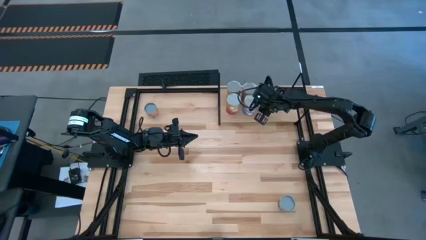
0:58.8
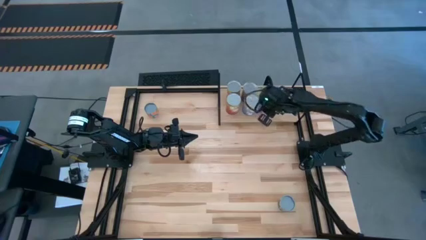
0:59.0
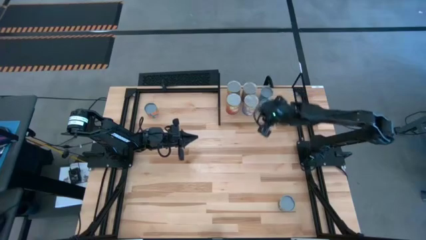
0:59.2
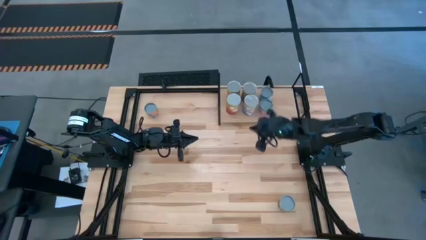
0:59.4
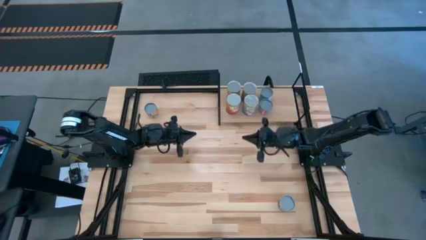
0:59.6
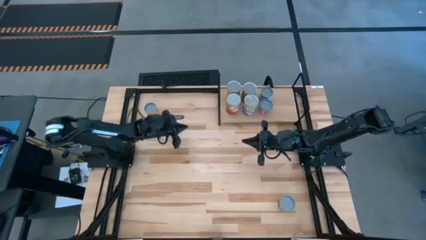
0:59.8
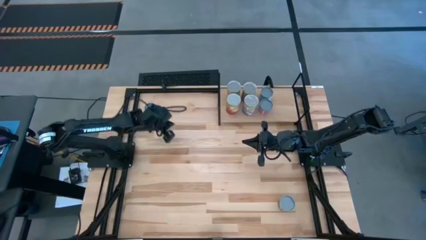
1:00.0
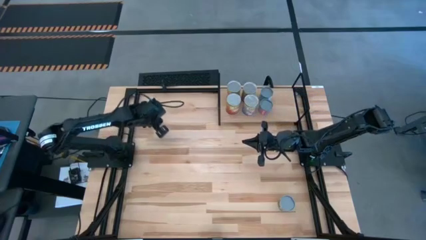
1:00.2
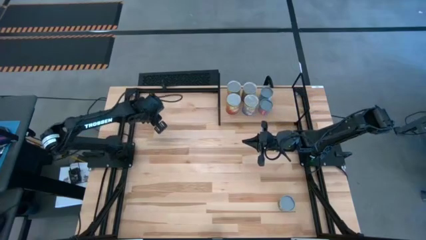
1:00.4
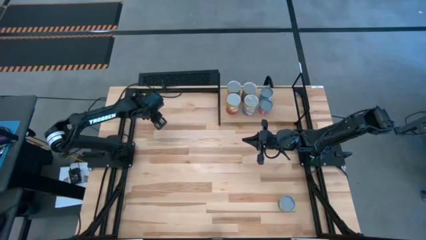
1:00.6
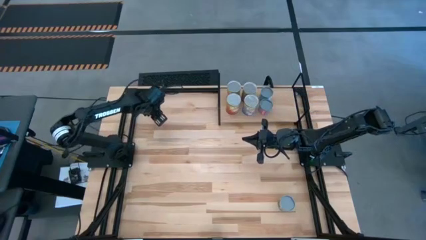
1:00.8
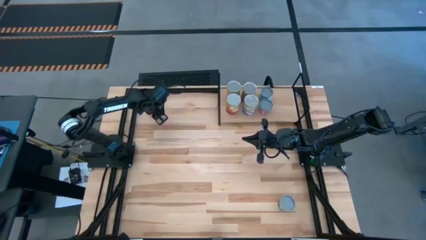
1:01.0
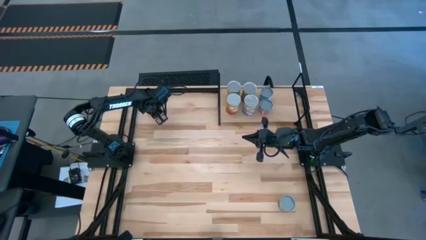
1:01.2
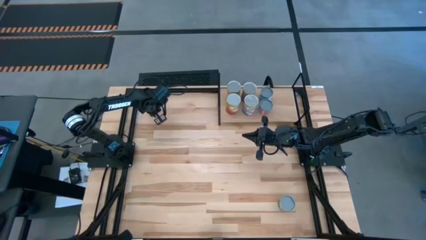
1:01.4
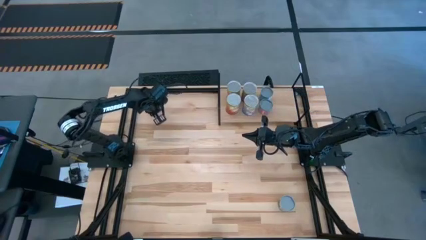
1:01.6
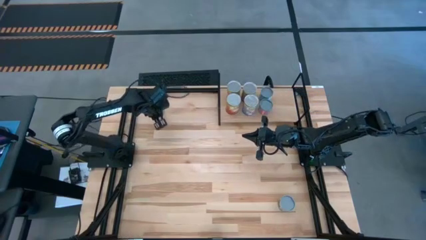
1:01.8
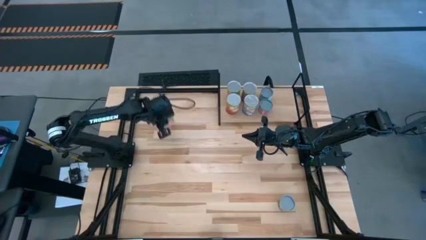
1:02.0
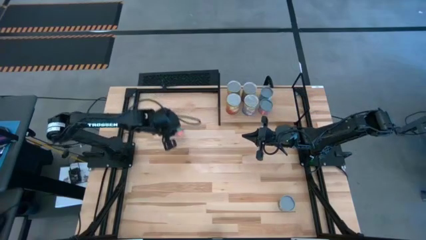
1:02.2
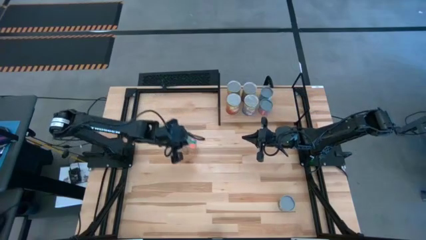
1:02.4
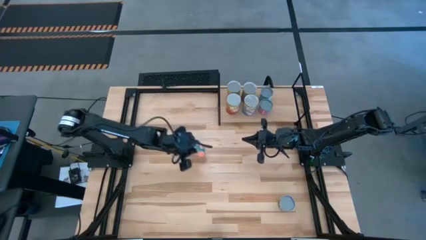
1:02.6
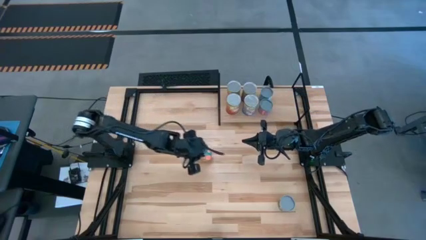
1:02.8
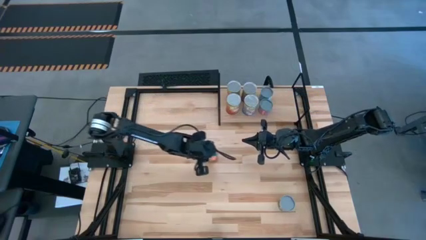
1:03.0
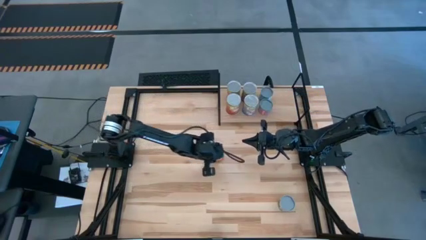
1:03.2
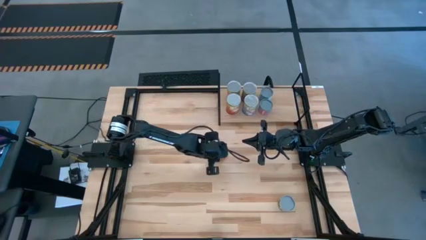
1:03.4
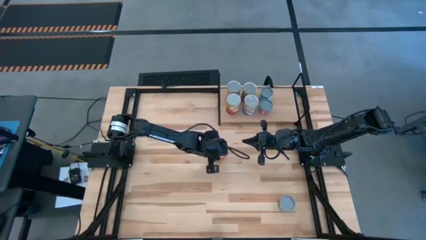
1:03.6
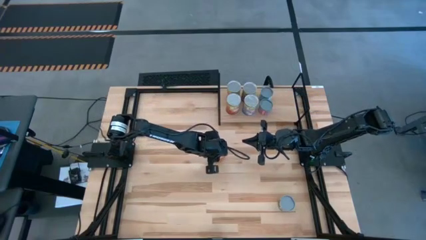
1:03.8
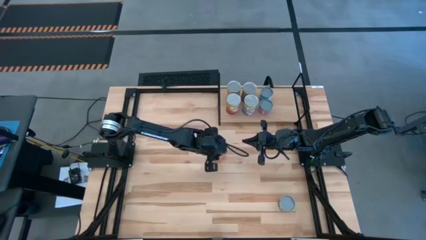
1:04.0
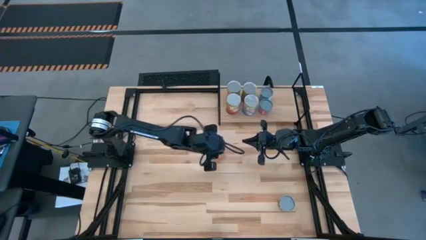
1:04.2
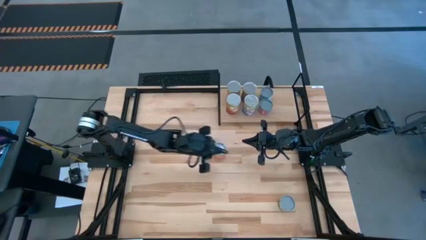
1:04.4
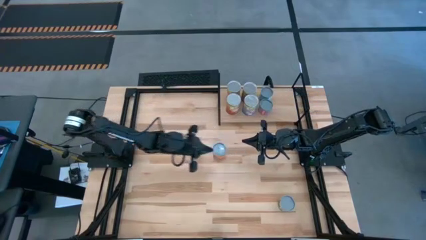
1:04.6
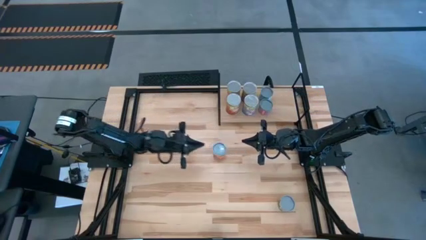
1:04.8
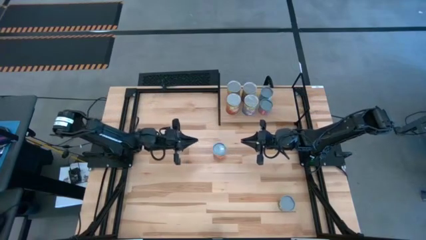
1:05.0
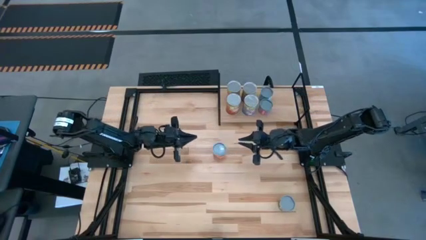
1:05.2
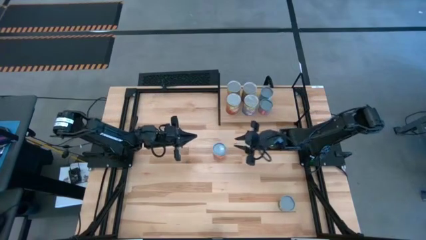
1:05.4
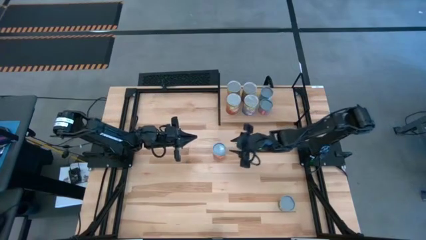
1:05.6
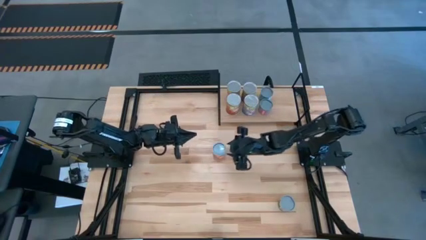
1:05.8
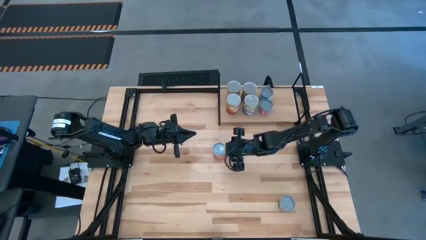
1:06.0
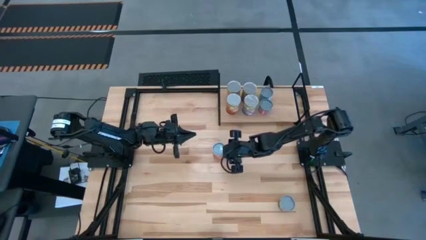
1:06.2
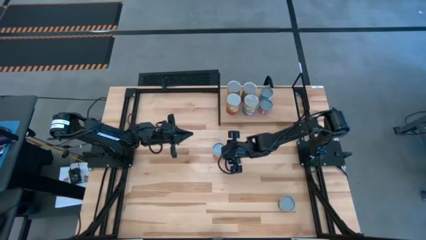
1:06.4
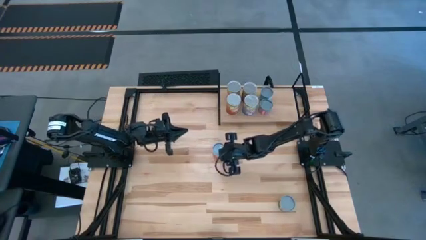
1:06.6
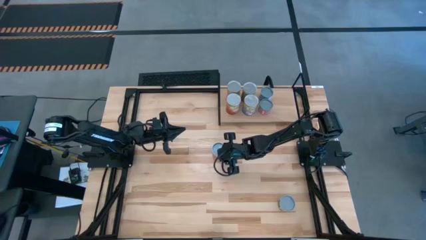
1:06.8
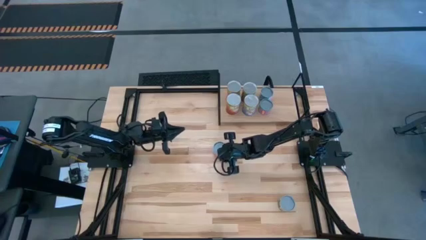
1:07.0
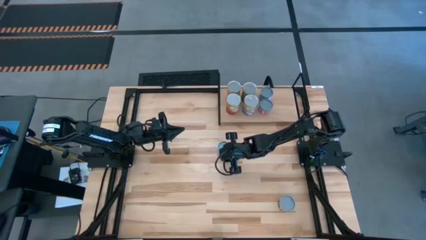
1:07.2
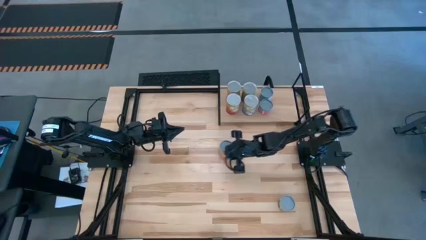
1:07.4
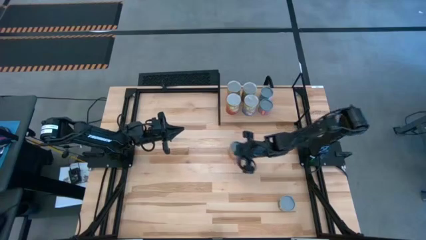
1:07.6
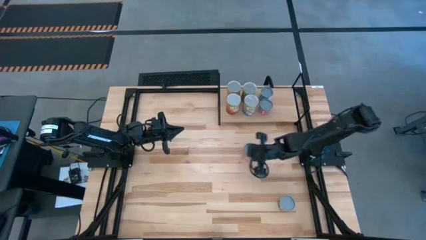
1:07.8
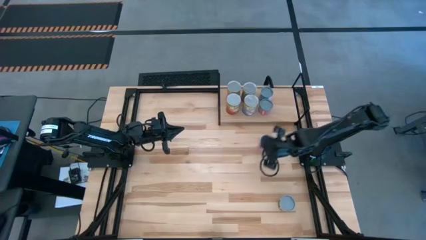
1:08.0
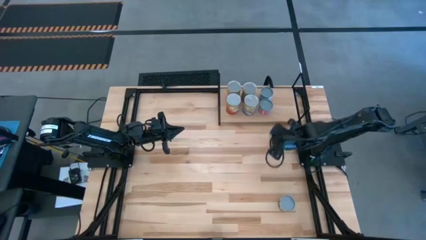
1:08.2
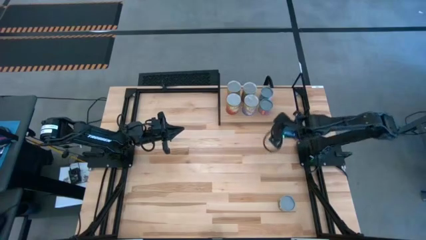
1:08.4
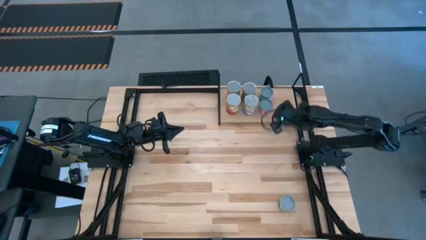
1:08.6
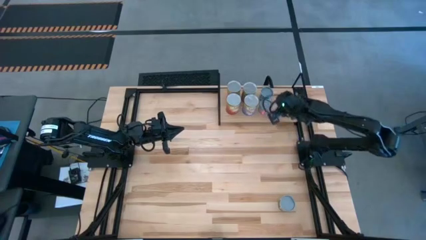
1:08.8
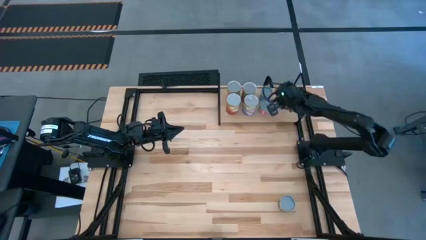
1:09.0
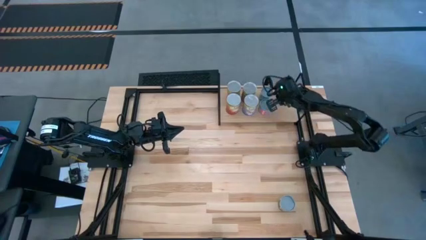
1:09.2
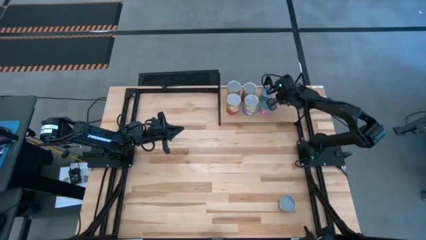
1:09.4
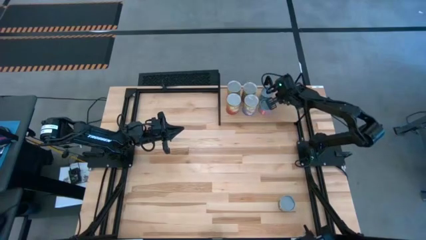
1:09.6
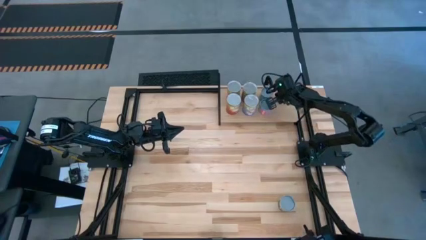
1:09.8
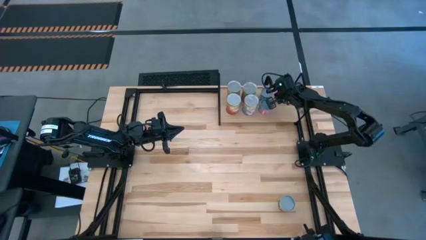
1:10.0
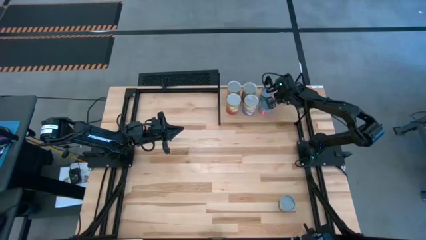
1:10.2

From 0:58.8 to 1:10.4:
Task: Pick and place cans onto a shelf
Put the canned oranges on the shelf

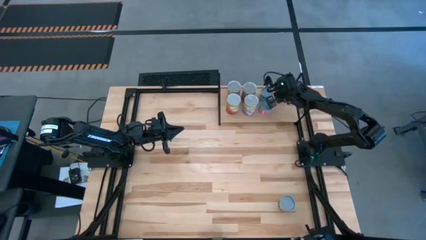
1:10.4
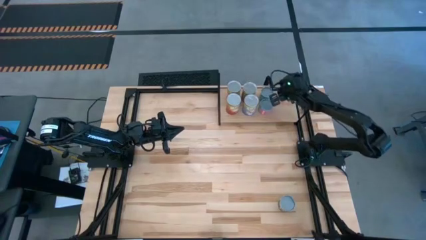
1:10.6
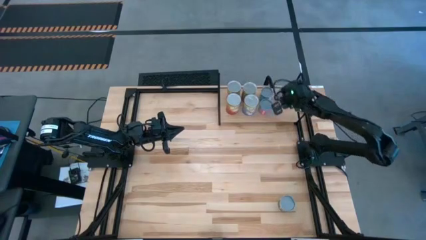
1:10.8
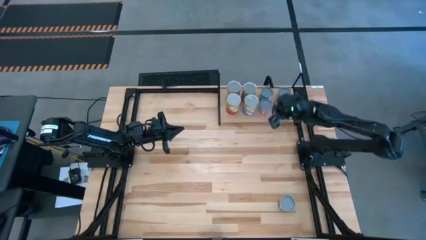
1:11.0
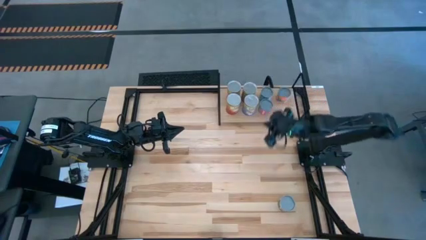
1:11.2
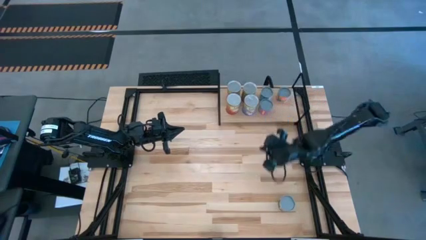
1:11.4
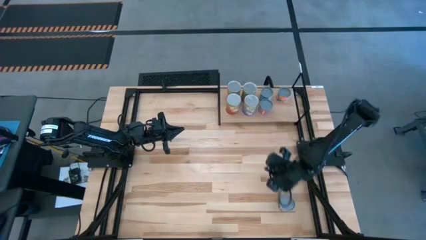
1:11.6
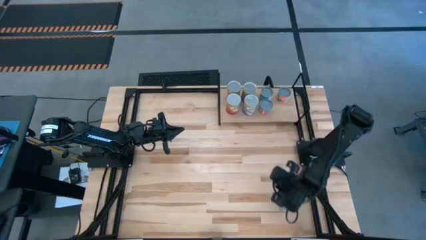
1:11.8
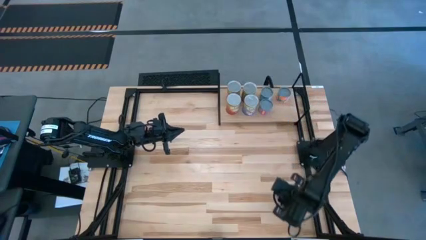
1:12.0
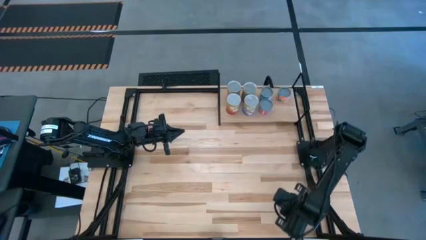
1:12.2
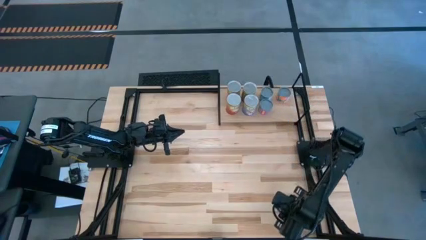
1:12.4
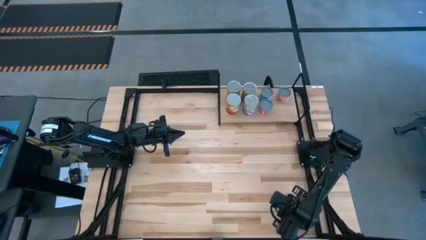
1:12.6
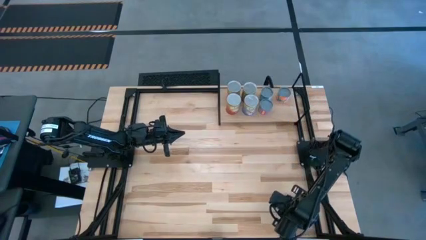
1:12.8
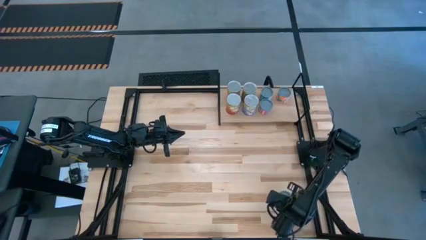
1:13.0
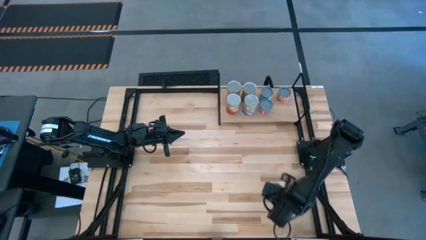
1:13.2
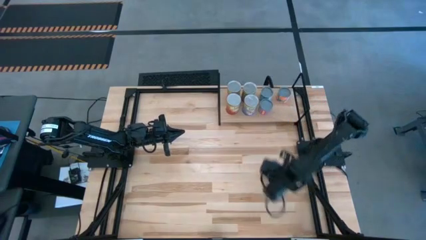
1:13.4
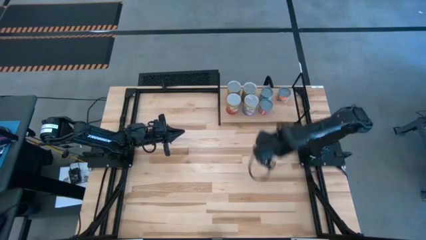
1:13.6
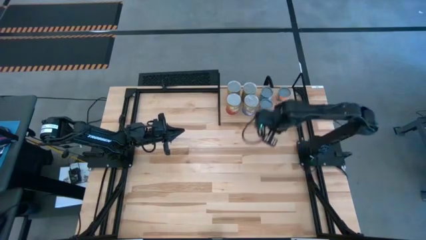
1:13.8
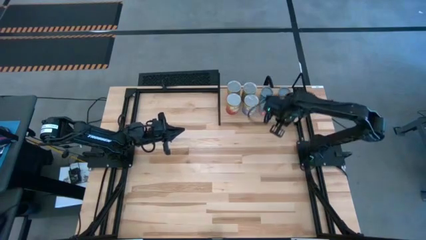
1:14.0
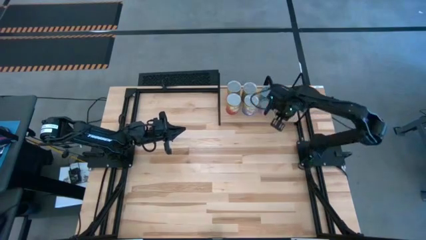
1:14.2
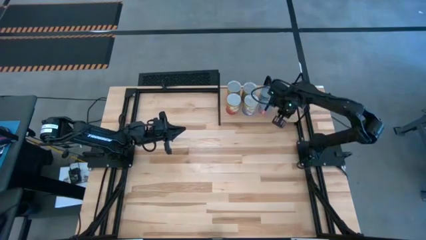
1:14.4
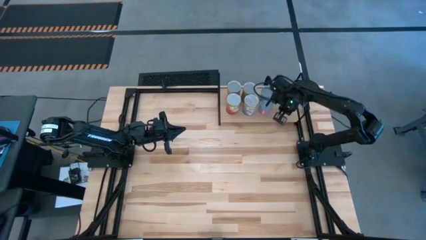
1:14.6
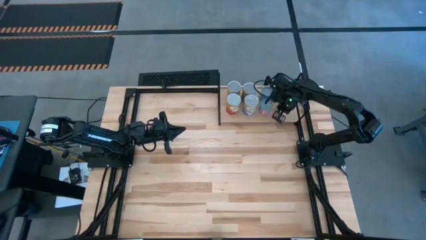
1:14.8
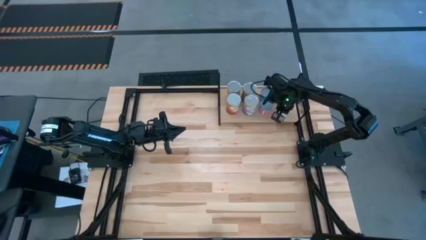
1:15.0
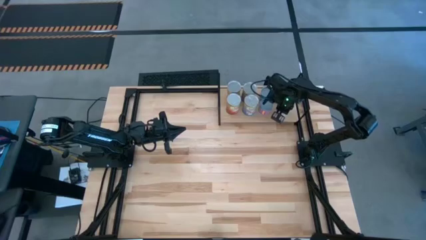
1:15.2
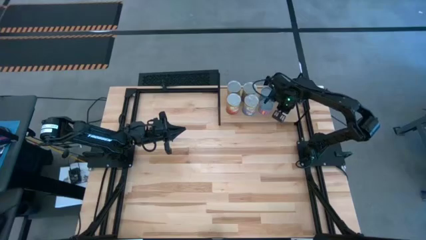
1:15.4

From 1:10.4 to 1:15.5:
Put the canned peas on the shelf

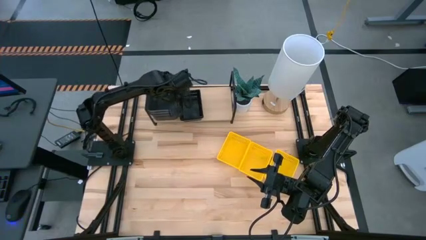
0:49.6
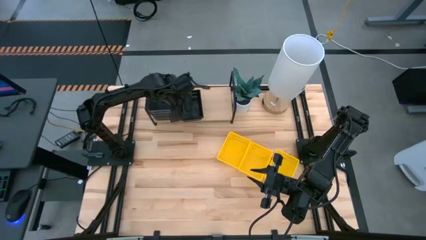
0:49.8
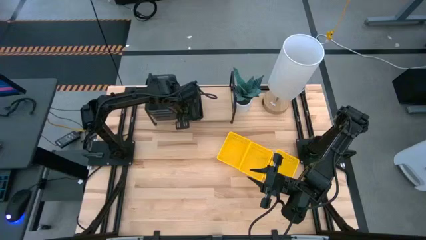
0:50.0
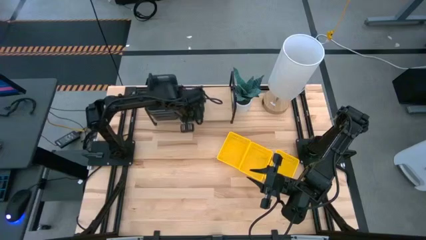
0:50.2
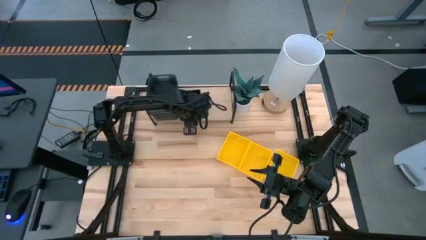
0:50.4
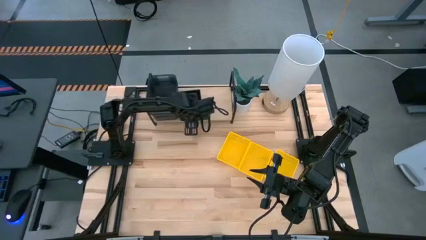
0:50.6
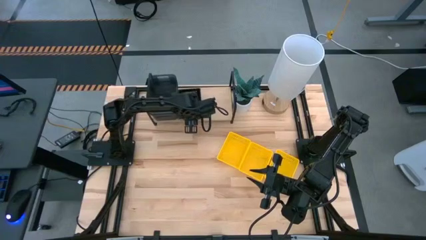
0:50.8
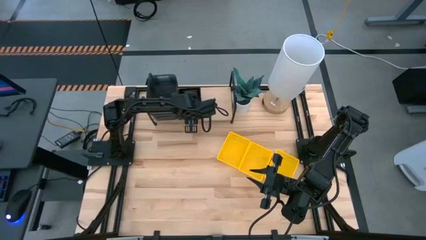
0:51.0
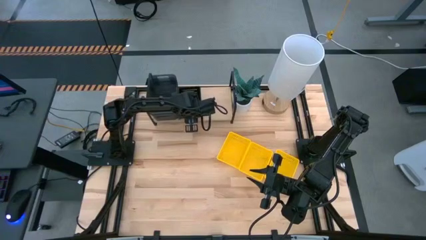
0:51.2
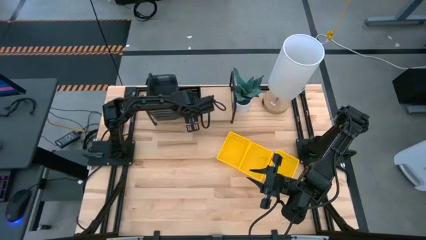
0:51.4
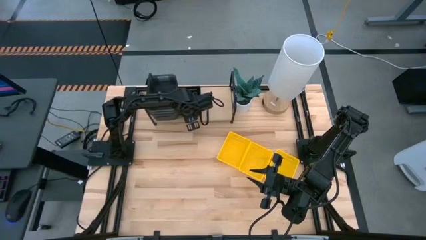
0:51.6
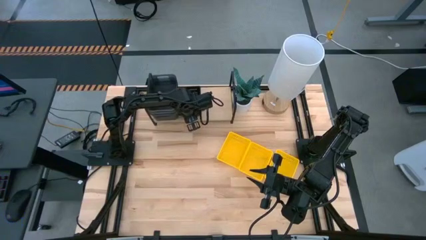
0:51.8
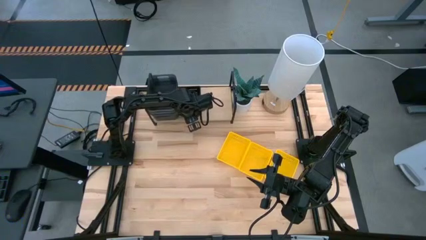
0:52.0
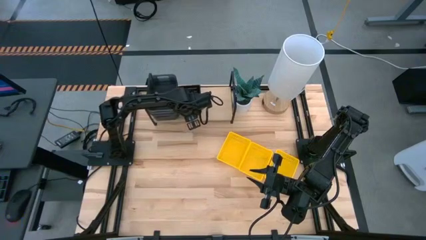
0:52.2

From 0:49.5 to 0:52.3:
Task: Stack baskets on shelf by color
Adjust the stacked black baskets on the shelf
